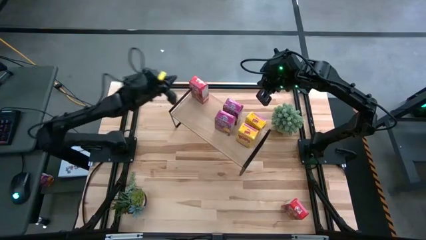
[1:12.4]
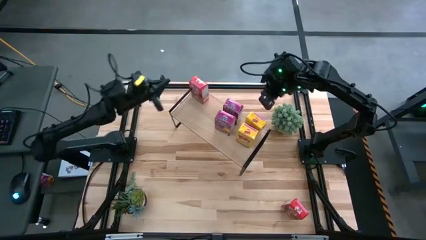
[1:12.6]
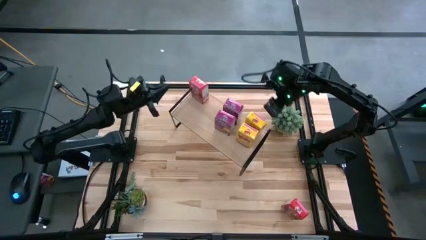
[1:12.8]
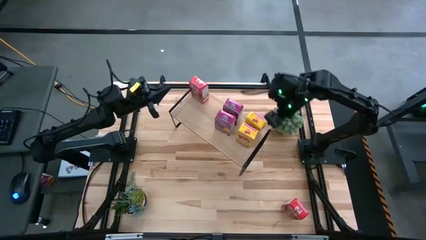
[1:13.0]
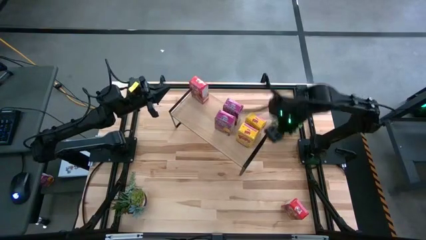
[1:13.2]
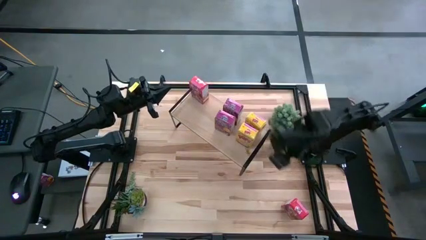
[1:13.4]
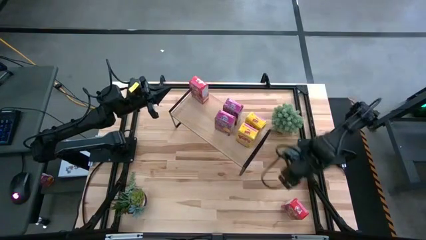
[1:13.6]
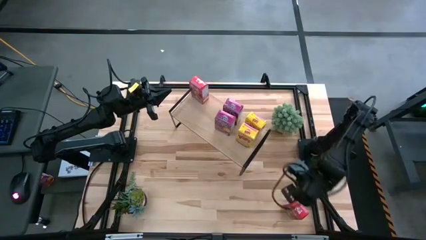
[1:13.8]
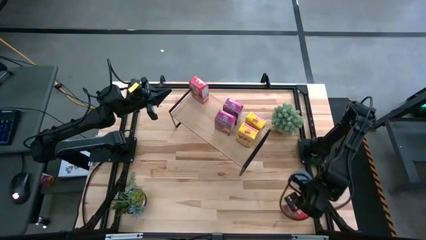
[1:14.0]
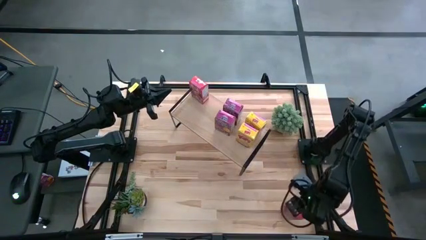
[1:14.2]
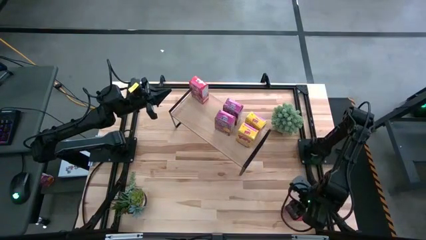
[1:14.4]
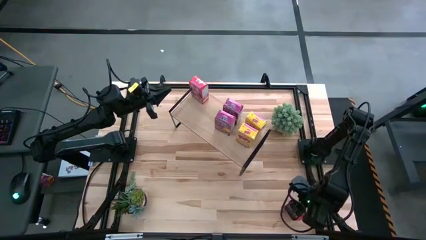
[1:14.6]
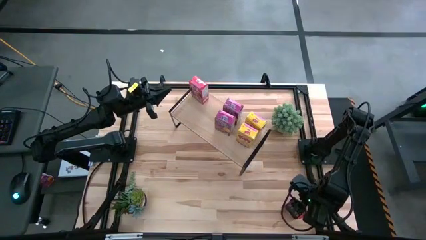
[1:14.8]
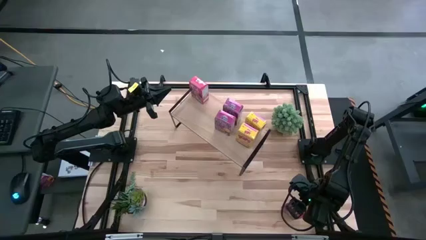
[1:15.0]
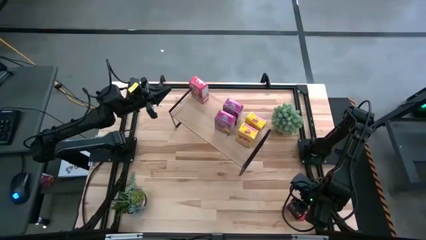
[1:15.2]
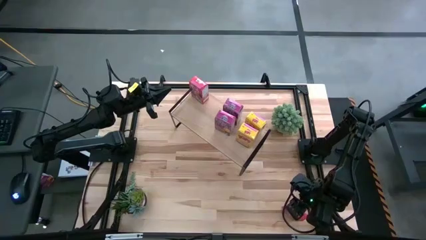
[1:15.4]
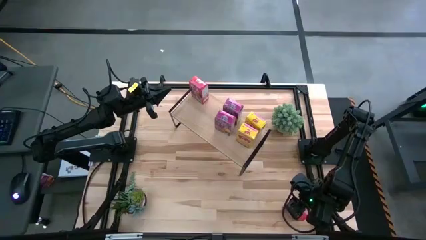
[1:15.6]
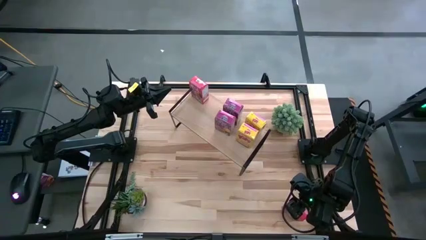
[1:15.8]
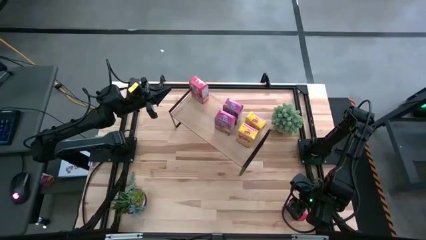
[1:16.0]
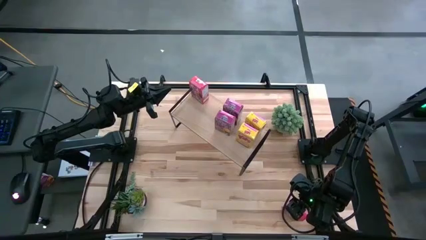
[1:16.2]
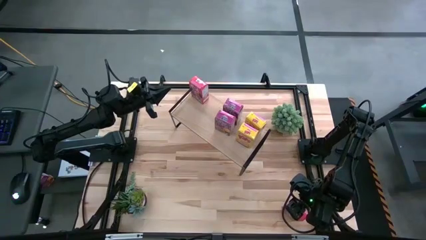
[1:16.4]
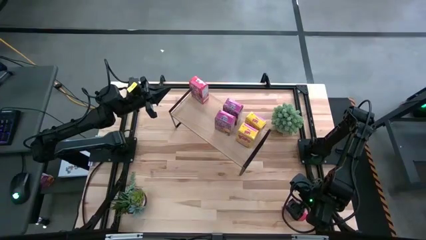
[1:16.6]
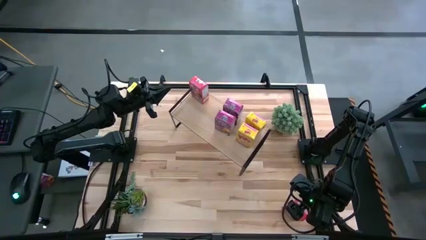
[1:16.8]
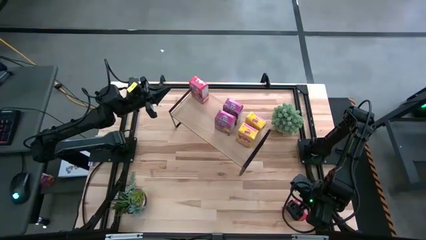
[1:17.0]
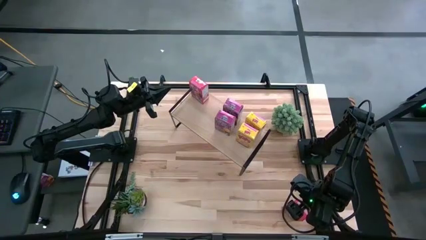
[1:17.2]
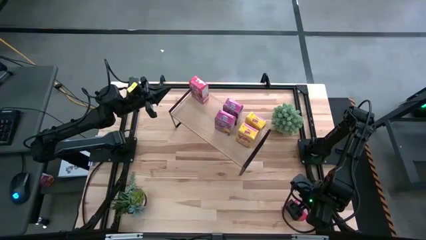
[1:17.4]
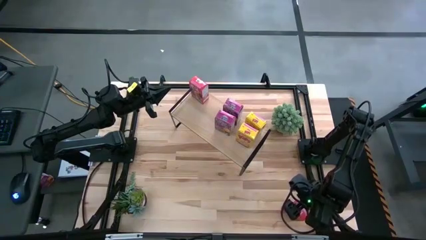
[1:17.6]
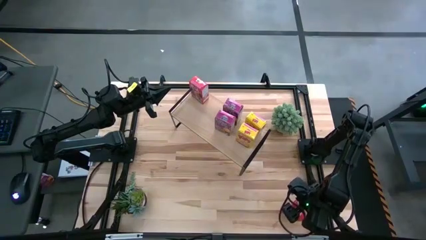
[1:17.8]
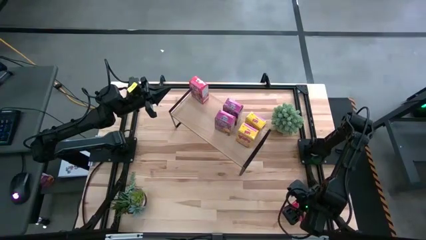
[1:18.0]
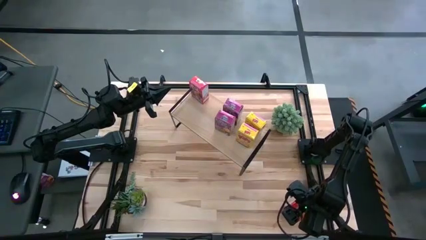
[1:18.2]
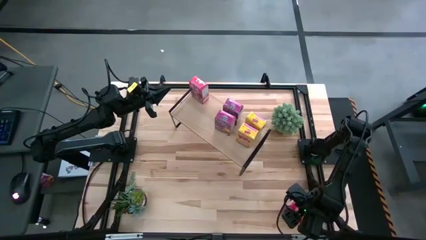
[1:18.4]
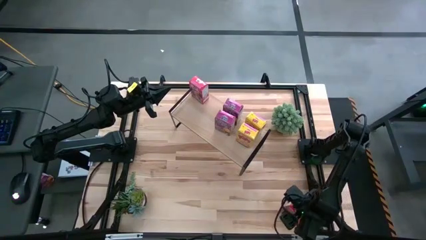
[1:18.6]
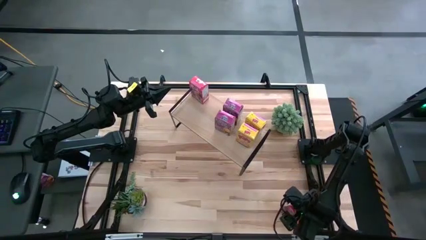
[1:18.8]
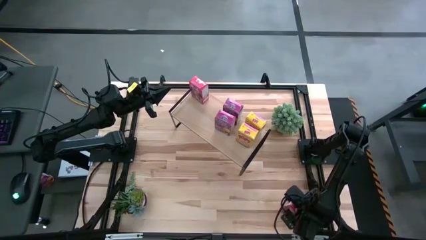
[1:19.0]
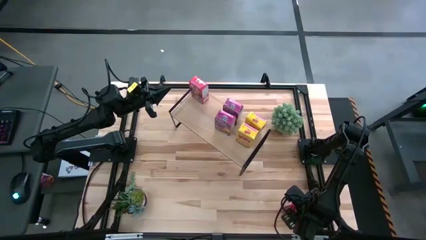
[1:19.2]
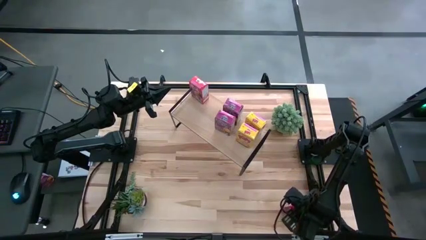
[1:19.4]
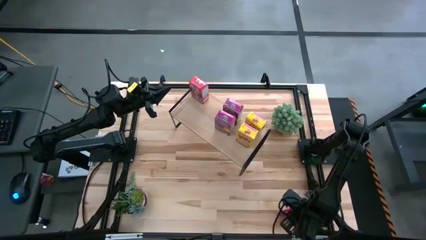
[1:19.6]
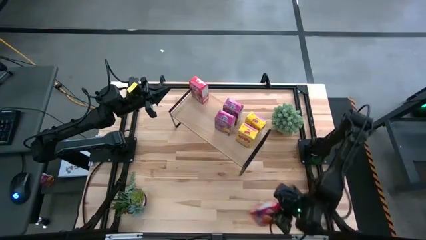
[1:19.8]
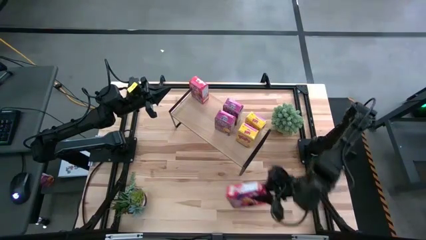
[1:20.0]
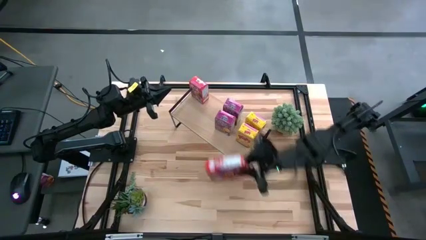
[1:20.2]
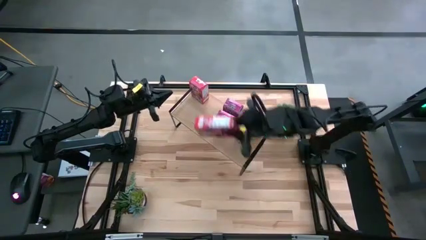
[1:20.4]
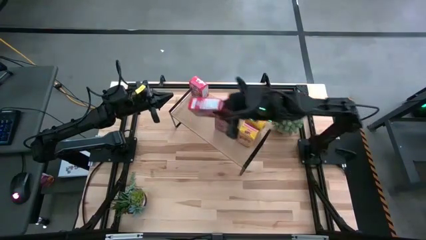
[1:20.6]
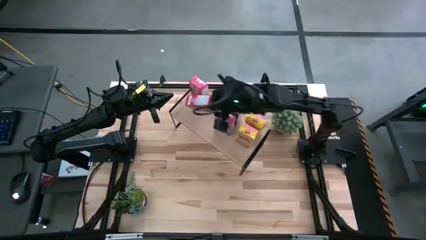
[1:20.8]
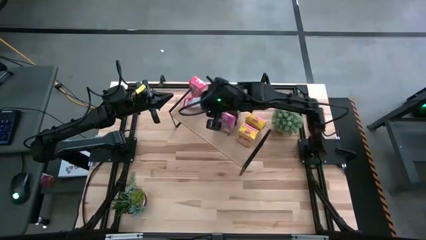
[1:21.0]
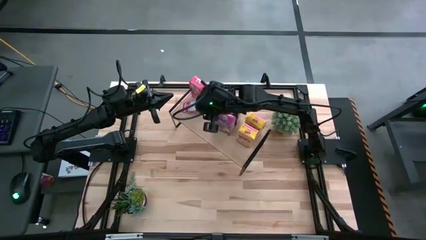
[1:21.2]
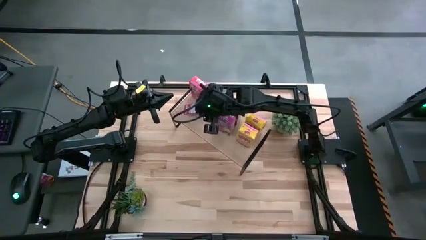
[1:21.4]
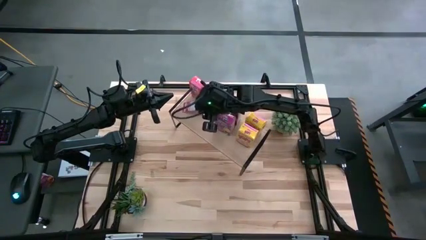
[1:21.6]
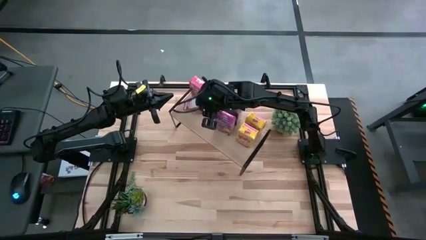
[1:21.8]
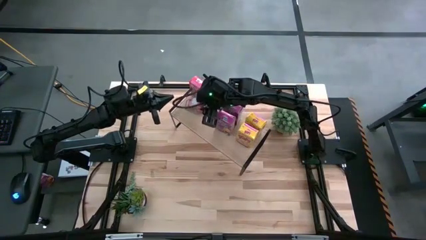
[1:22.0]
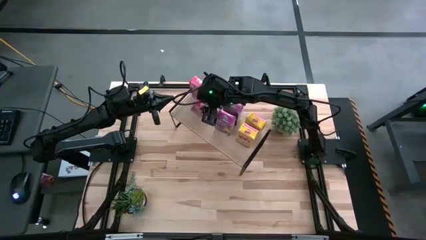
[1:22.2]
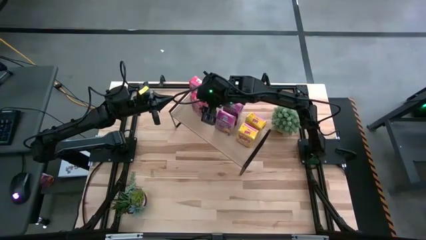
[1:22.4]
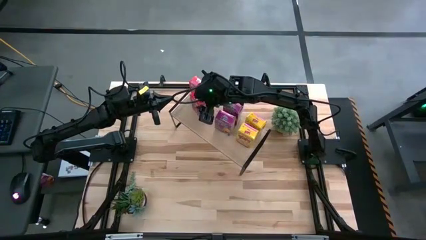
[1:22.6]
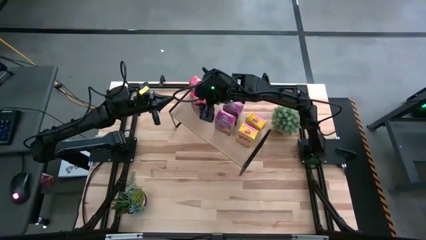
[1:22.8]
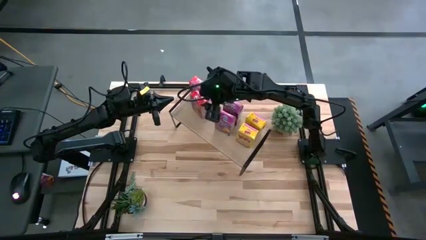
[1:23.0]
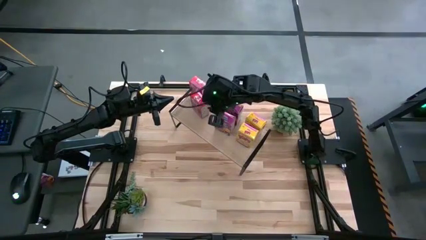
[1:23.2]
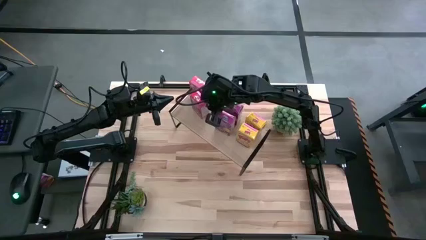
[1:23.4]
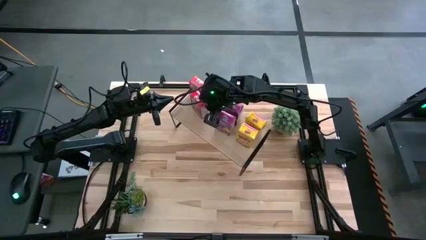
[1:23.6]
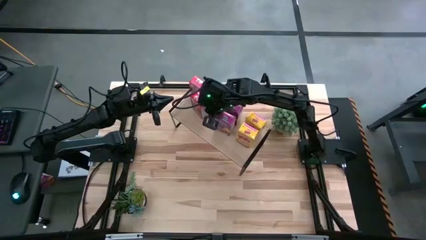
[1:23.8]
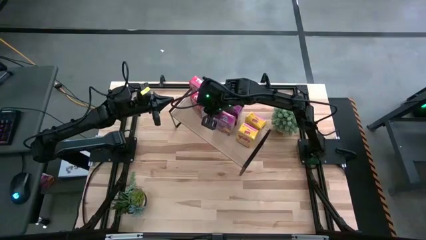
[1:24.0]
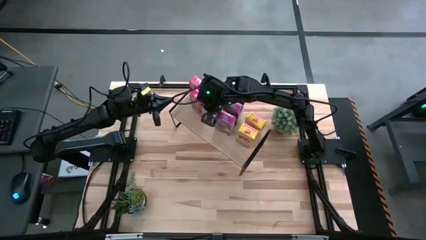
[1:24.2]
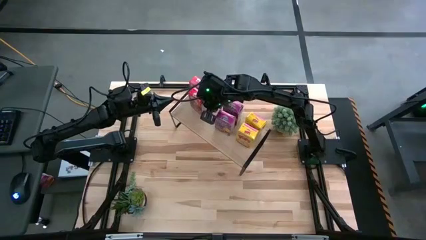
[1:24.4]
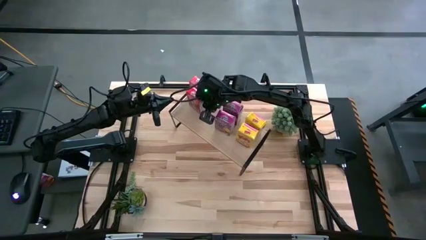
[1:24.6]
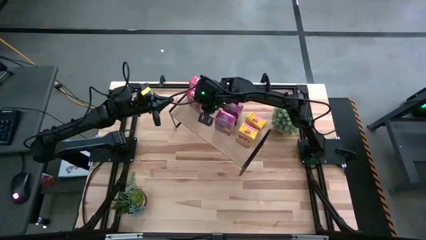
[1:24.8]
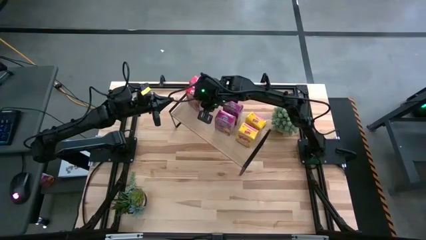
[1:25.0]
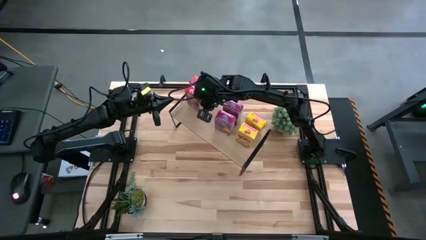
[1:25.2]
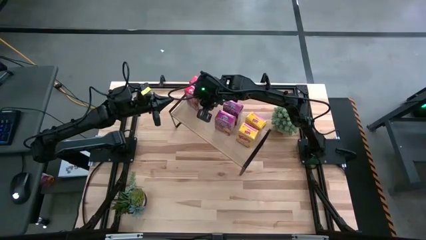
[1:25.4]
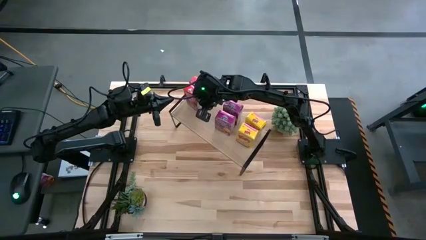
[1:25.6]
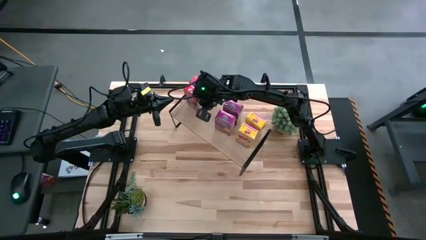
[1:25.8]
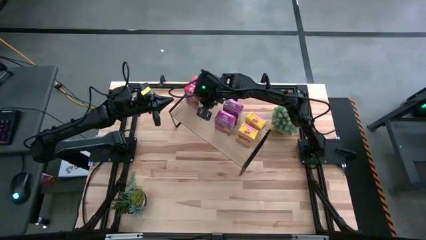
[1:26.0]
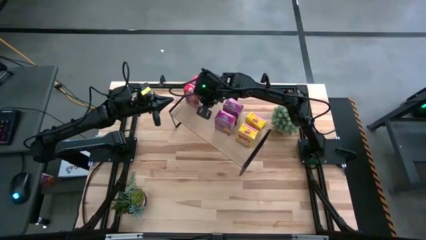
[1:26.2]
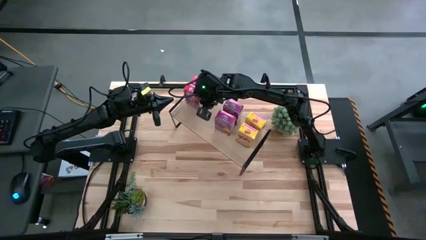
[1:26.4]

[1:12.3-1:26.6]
Task: Stack cereal on shelf
Put the red cereal box on the shelf
